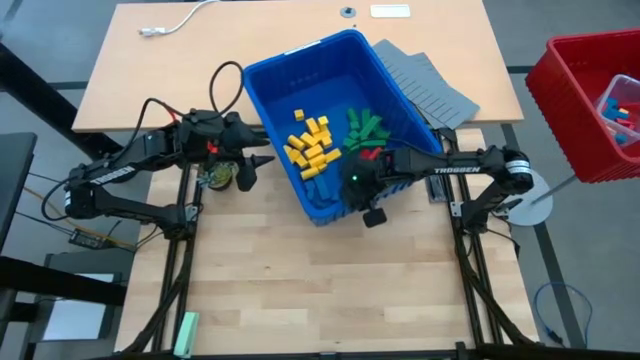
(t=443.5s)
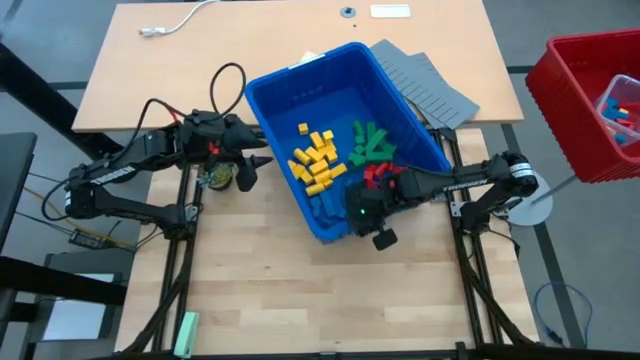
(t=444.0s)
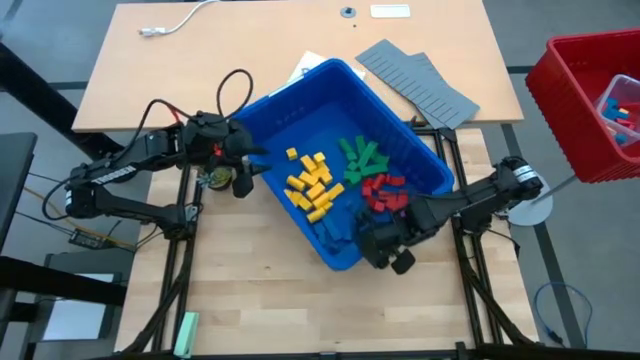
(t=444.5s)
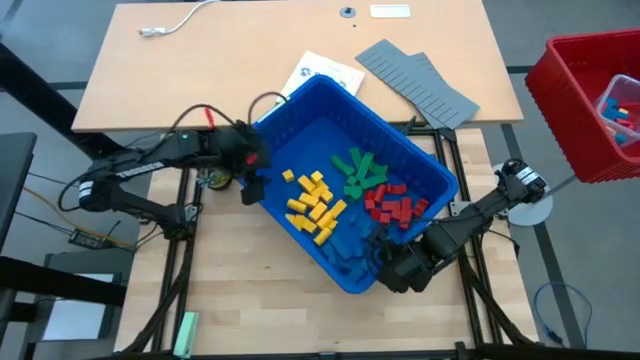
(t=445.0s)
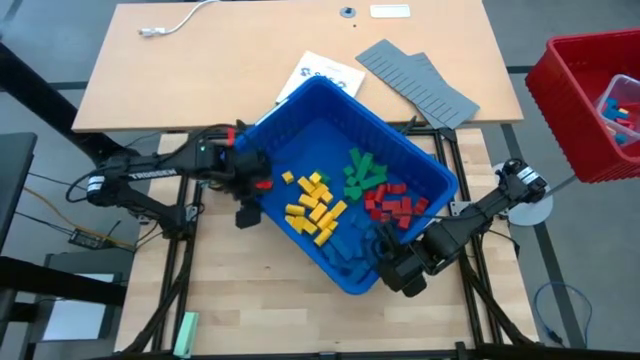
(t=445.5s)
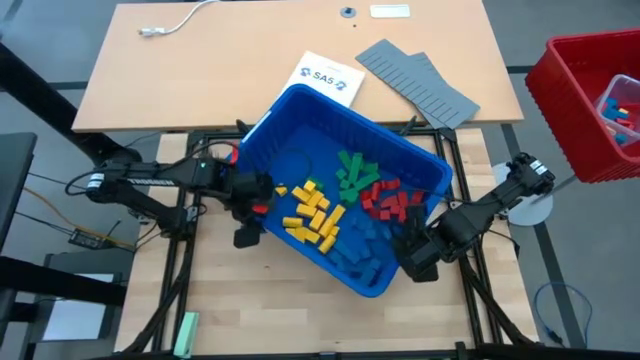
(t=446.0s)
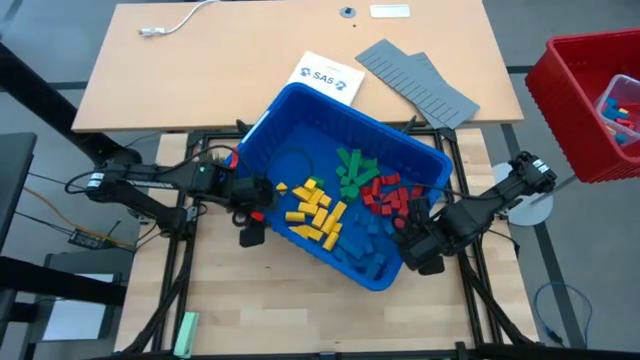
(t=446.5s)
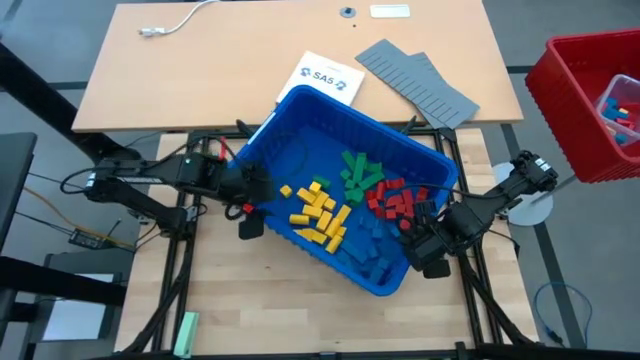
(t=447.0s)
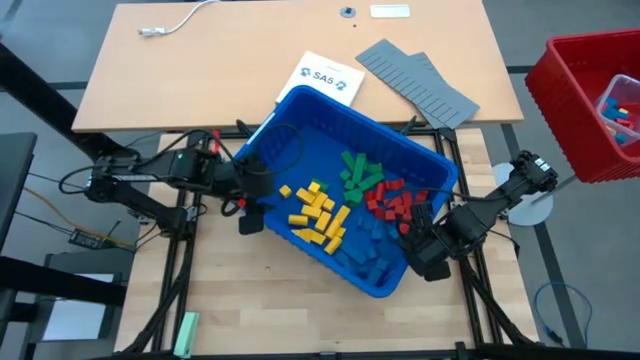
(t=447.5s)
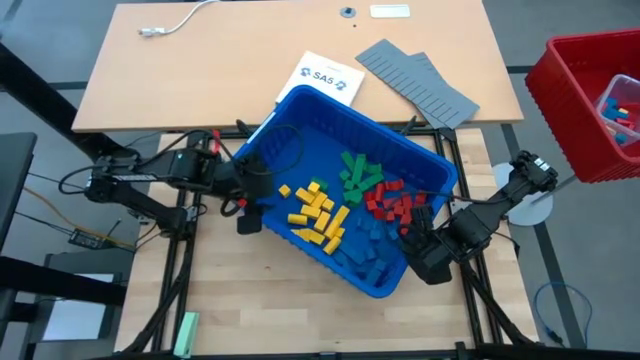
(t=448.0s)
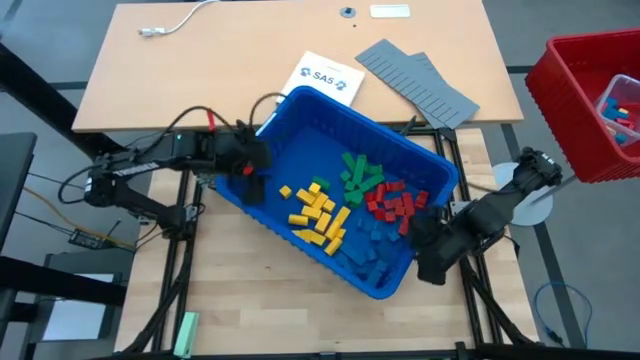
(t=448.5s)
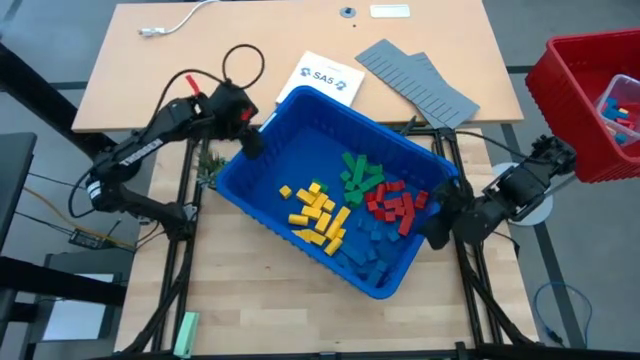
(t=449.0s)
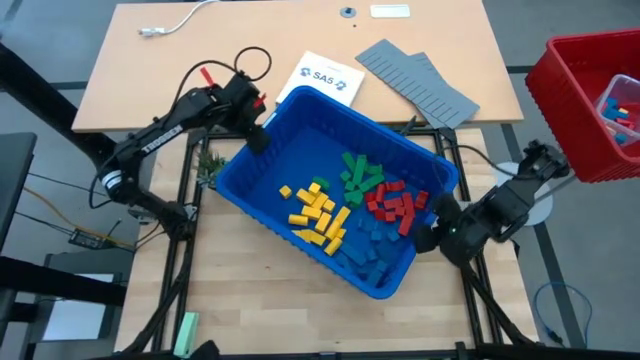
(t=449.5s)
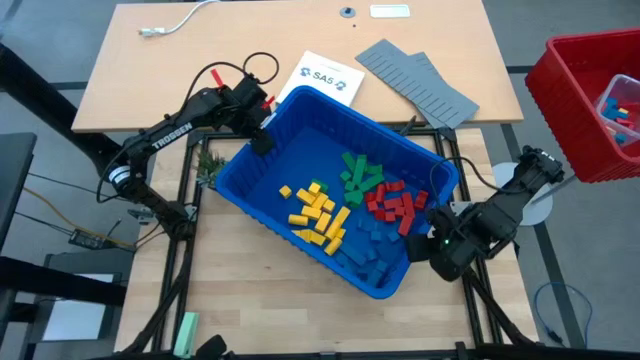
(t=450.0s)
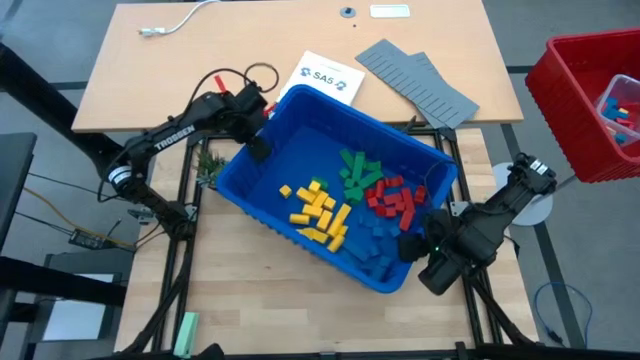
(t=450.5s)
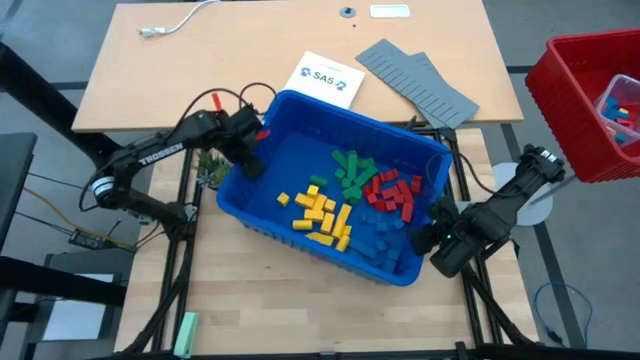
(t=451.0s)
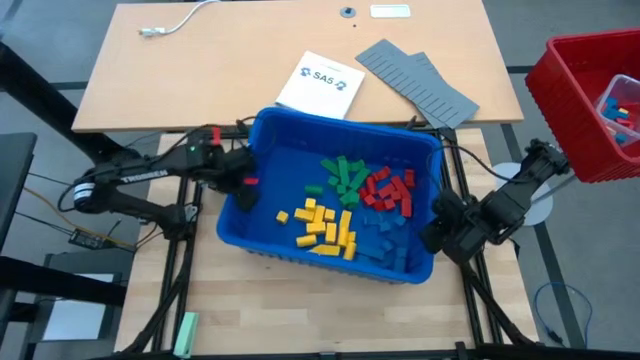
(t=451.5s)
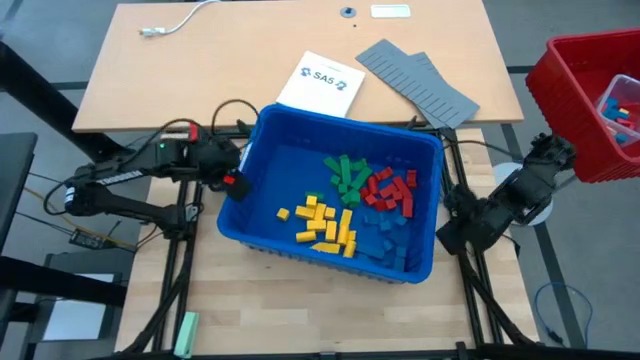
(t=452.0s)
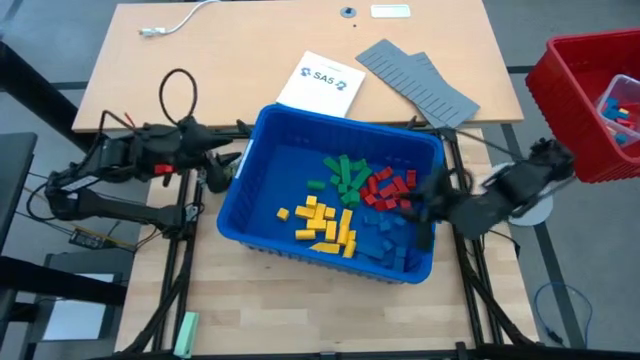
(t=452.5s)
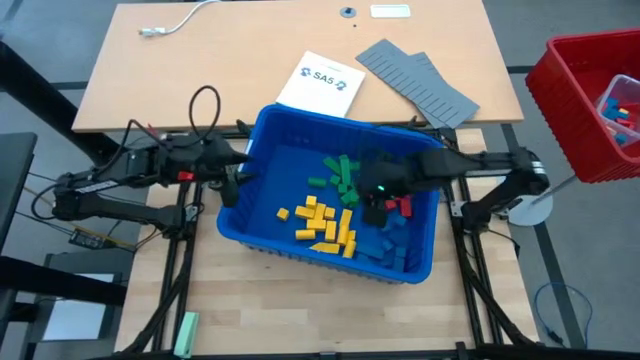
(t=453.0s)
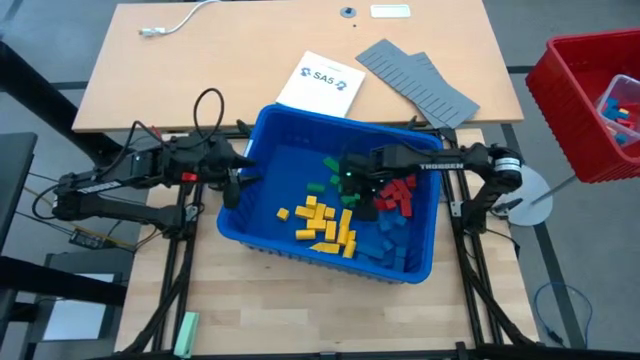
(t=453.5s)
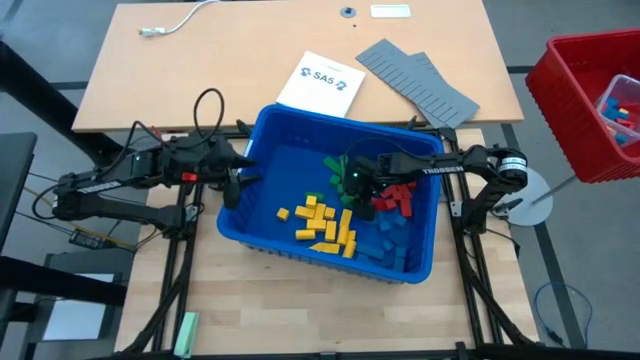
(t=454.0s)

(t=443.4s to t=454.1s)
Task: Sort blocks
Adjust the blue bin

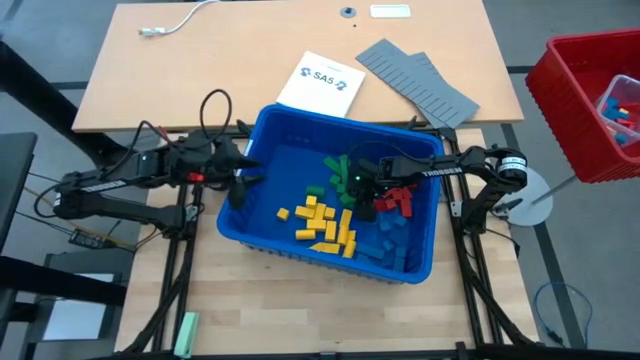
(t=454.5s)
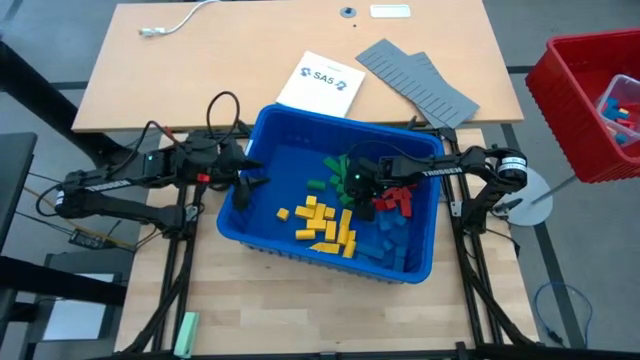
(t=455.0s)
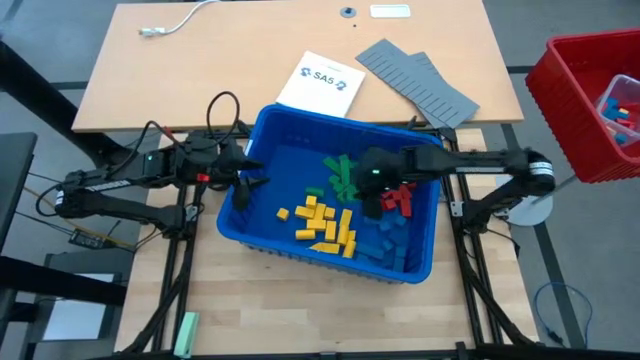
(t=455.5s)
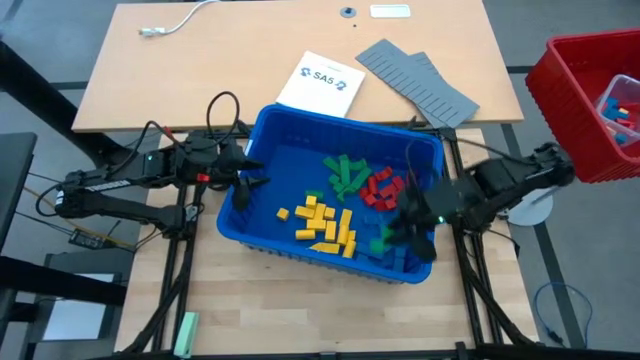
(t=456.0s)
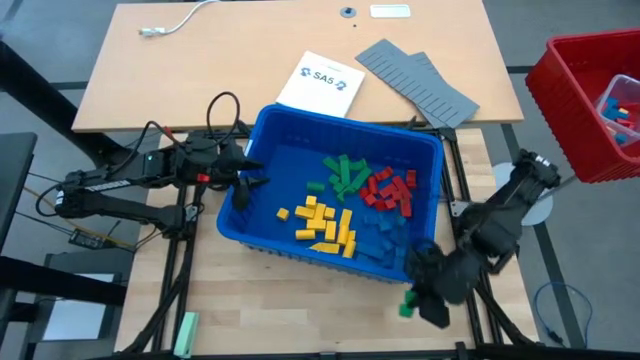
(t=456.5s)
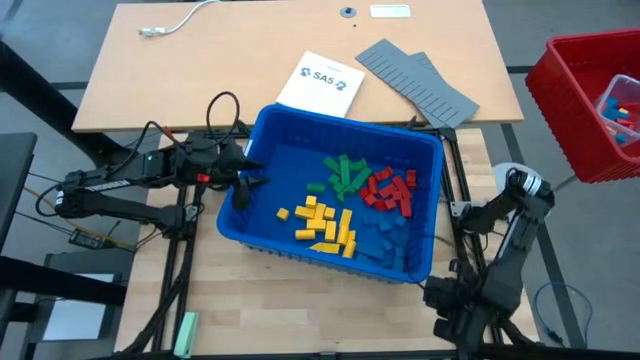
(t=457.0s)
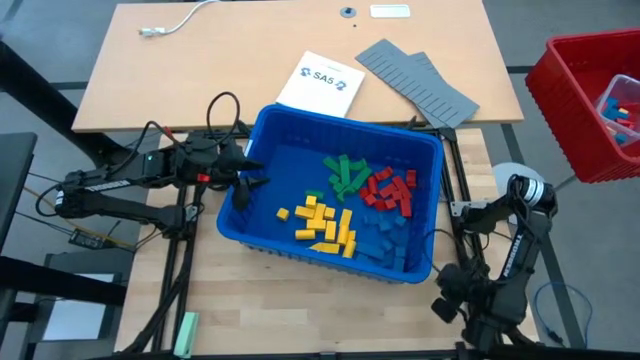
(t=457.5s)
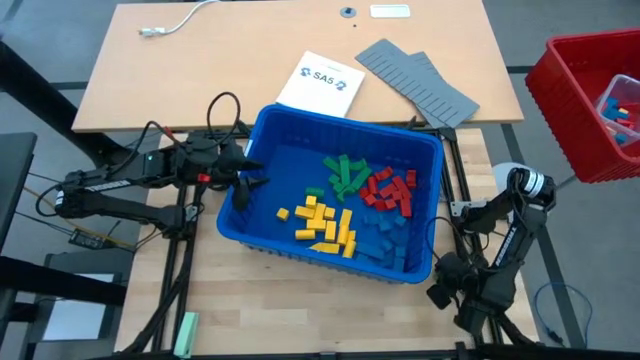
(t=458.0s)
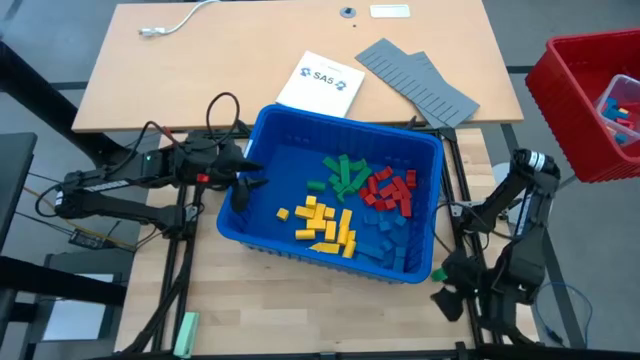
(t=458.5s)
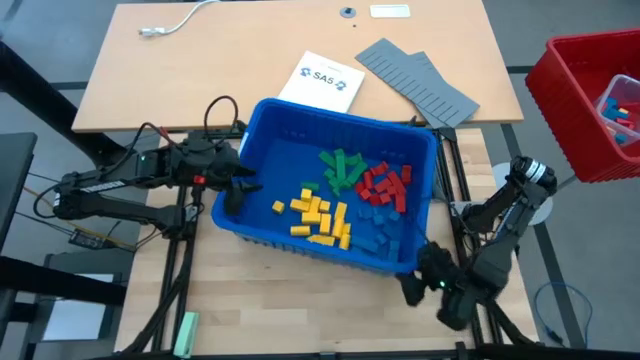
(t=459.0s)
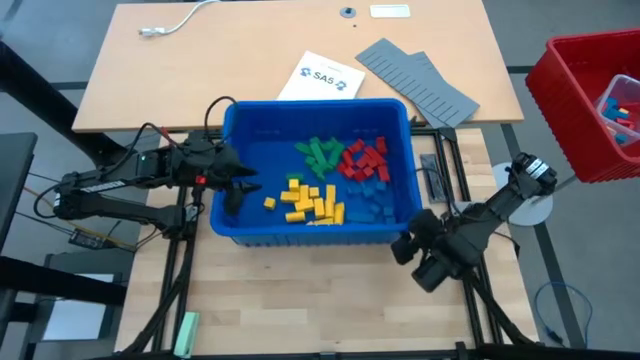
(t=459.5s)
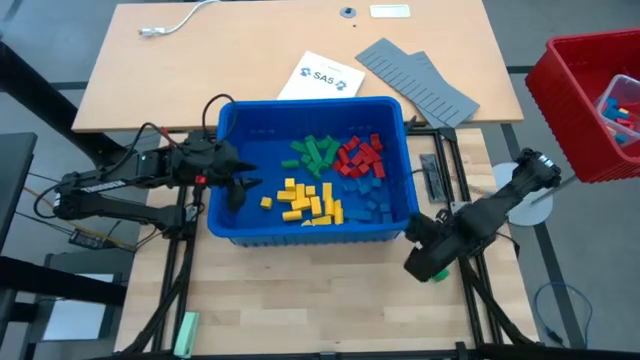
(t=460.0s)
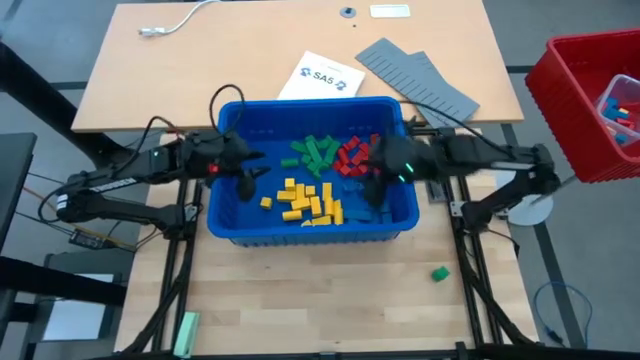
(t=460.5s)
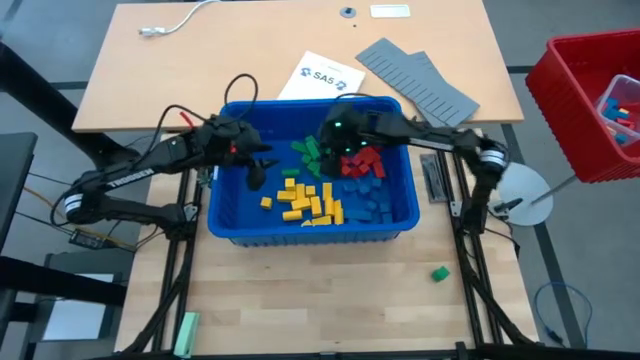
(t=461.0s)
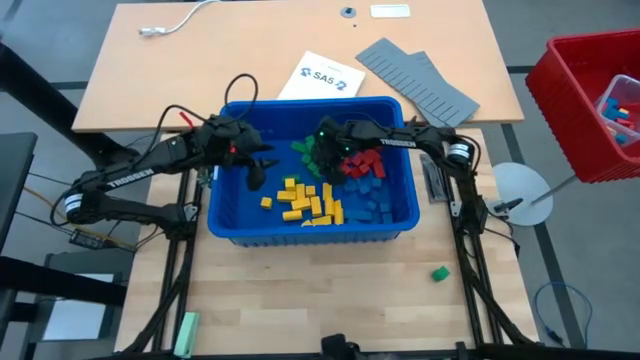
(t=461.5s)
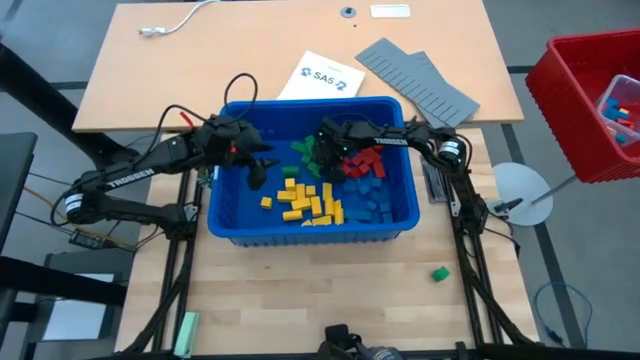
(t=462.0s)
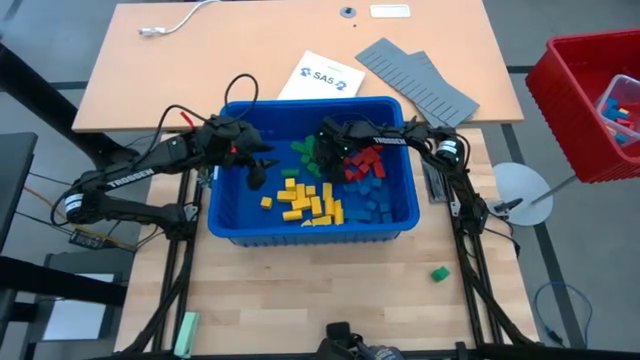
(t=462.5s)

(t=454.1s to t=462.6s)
Remove the green block from the blue bin
